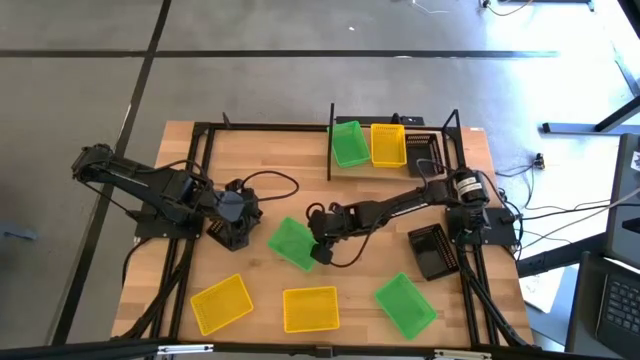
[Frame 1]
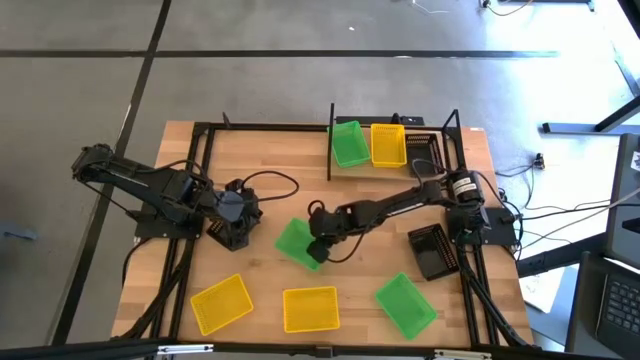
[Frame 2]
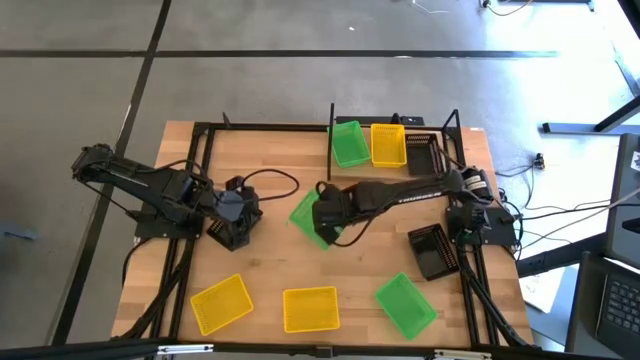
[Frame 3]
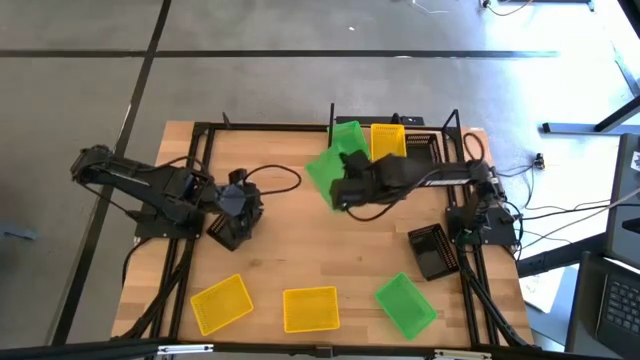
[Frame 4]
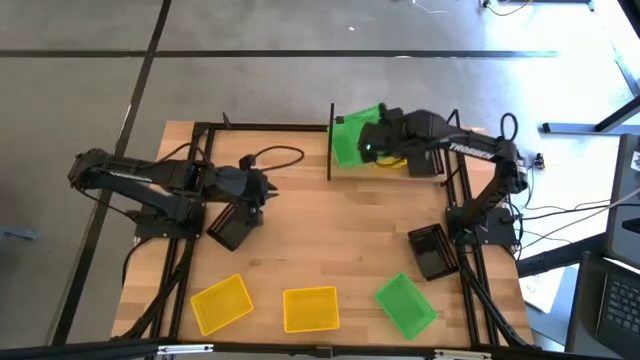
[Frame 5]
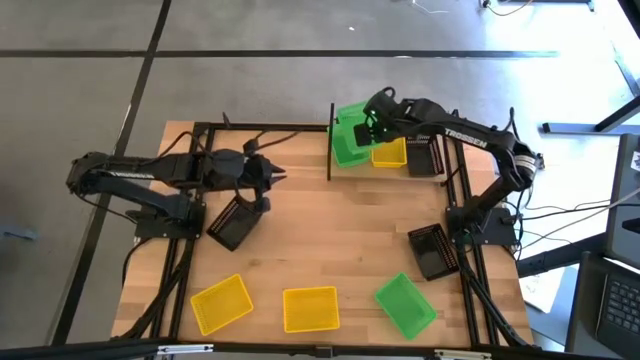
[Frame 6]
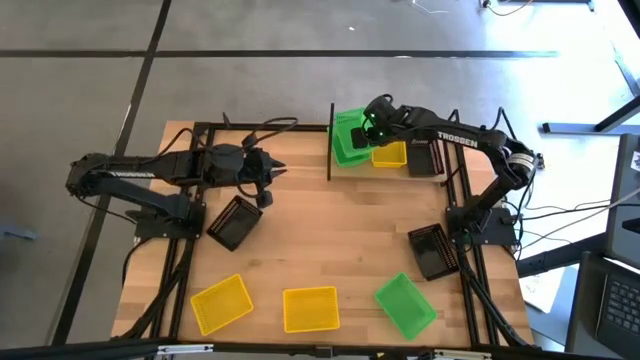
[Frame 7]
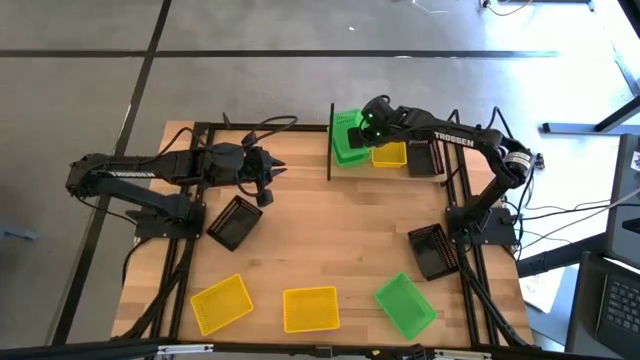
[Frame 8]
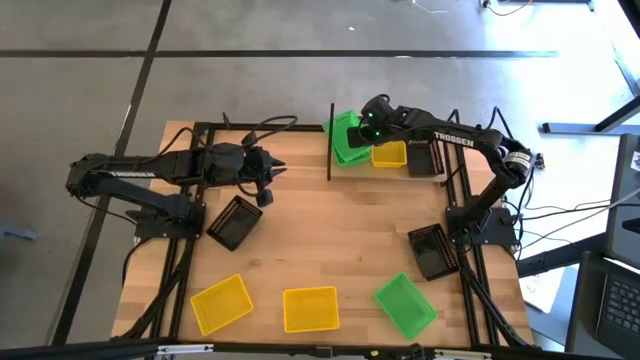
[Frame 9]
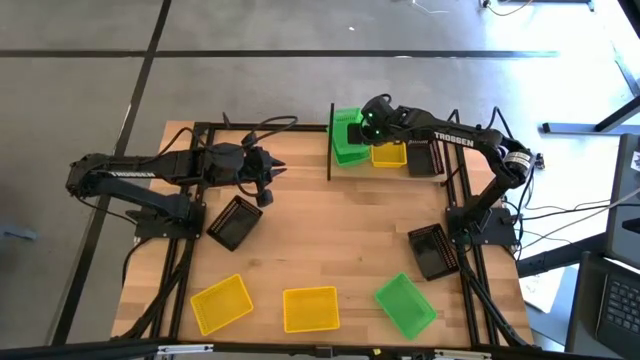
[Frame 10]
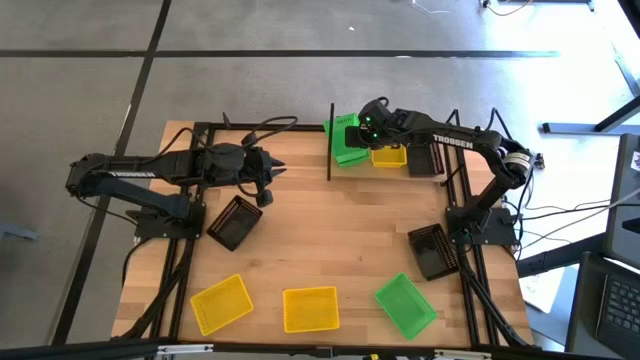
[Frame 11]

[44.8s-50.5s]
Task: Stack baskets on shelf by color
Stack the top green bin on the green bin on the shelf

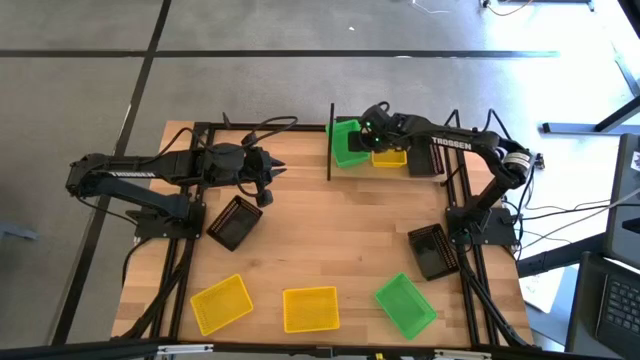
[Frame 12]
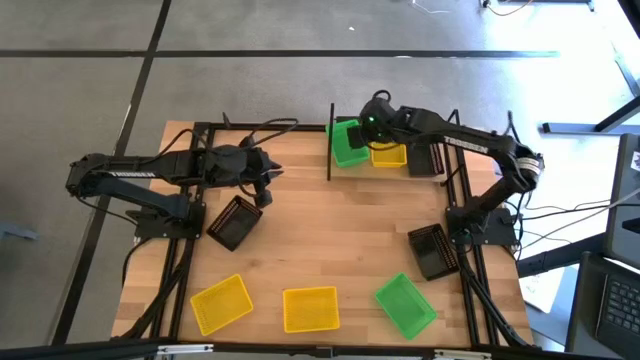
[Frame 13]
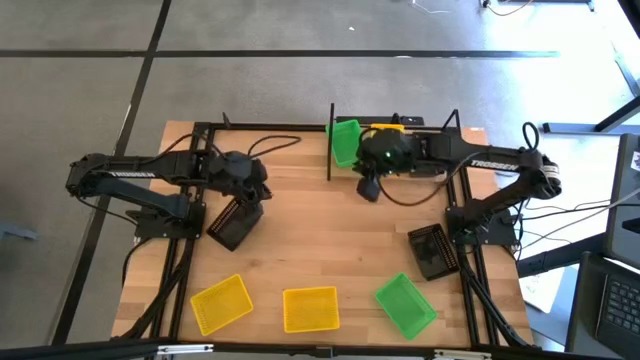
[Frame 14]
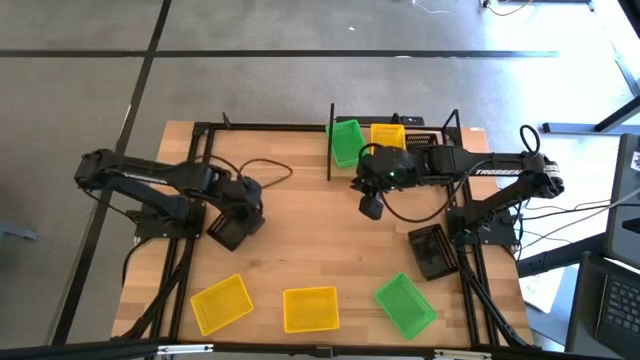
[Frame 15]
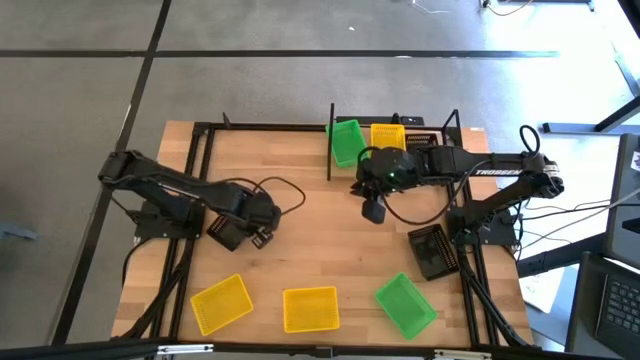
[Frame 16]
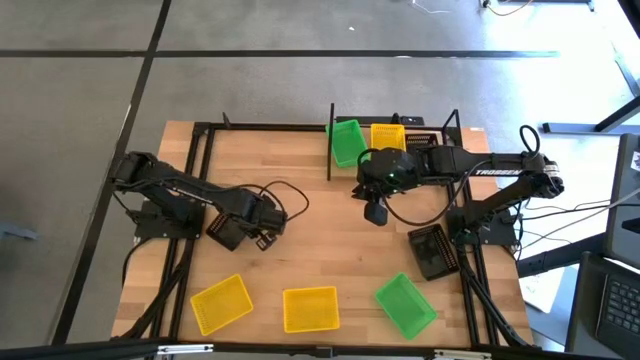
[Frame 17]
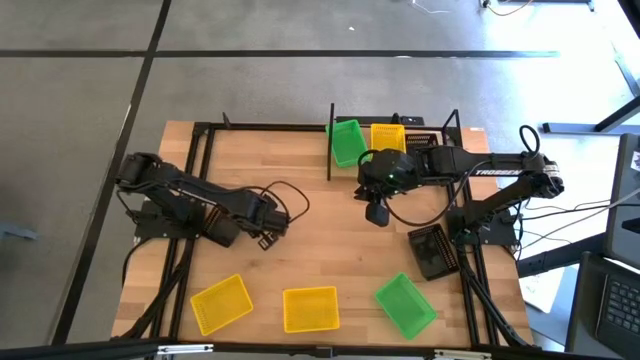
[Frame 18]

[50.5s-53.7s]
Stack the left black bin on the black bin on the shelf

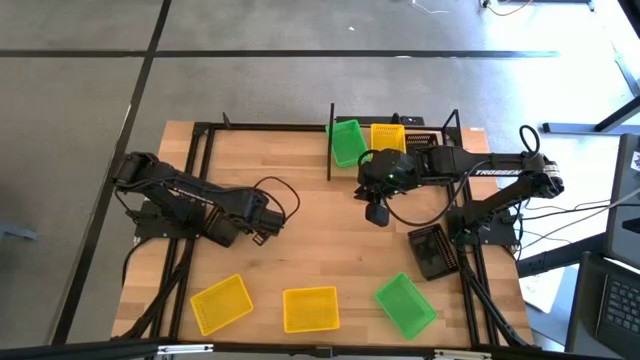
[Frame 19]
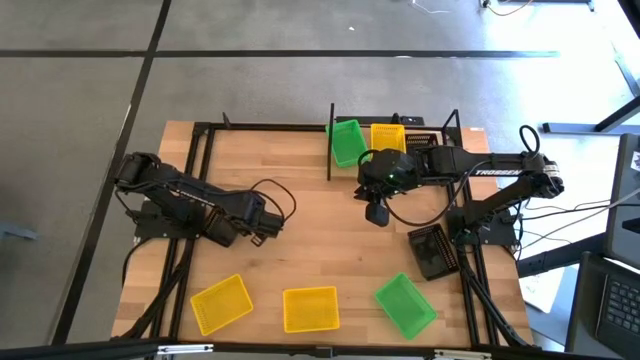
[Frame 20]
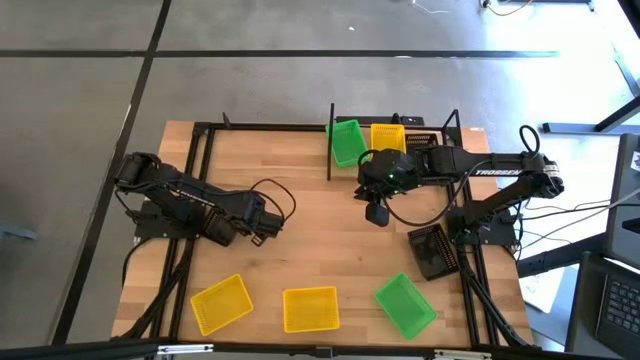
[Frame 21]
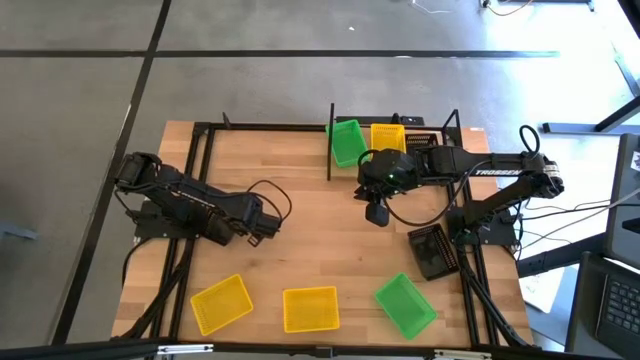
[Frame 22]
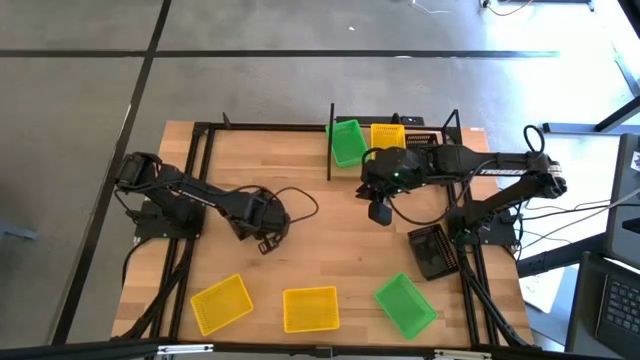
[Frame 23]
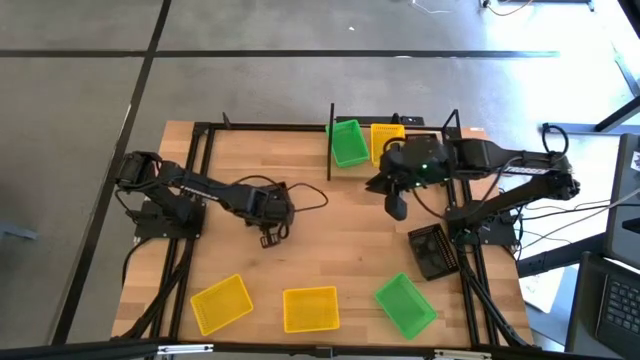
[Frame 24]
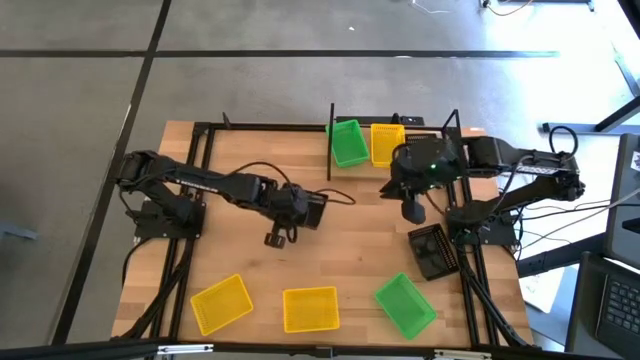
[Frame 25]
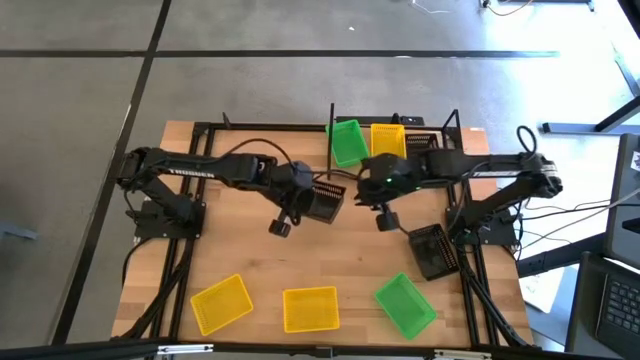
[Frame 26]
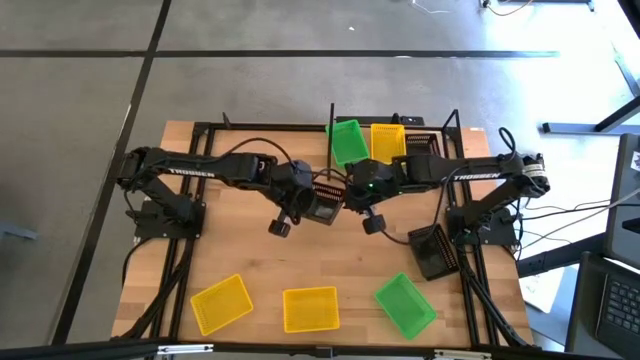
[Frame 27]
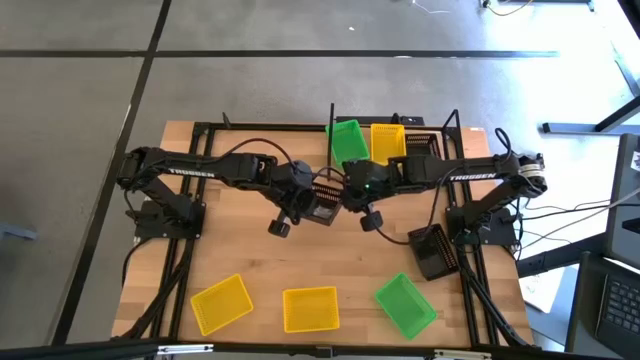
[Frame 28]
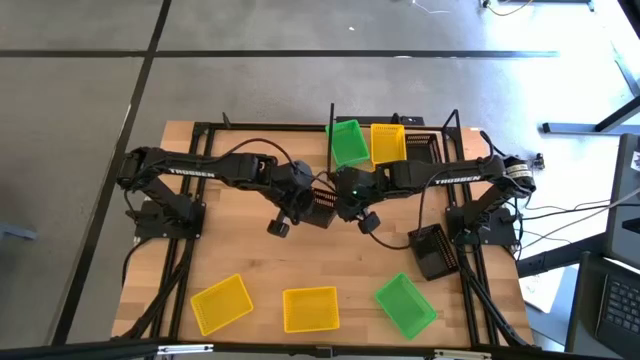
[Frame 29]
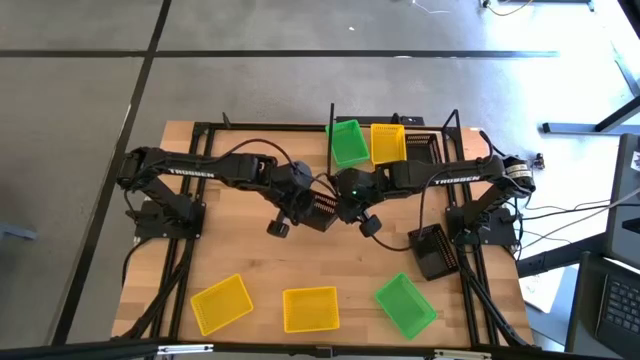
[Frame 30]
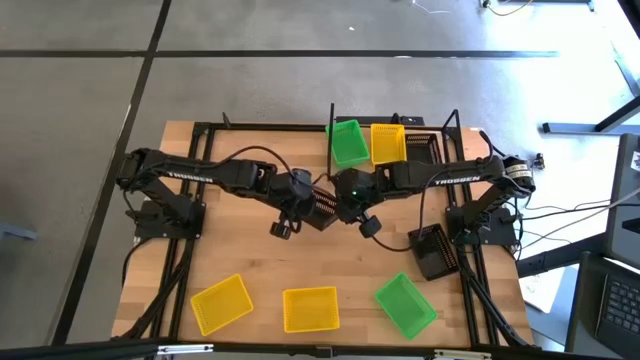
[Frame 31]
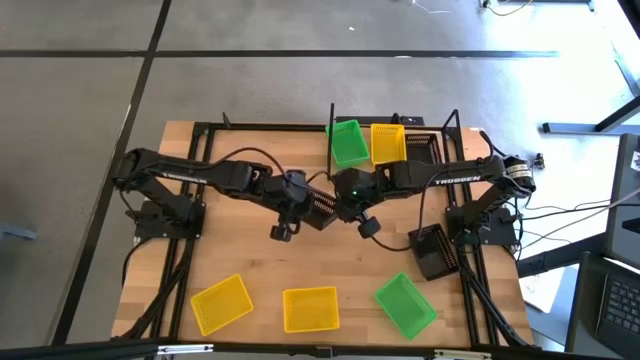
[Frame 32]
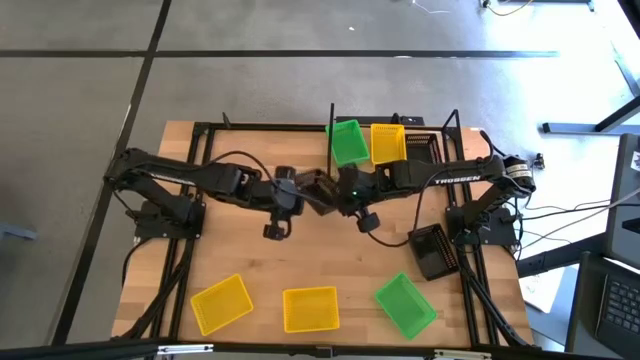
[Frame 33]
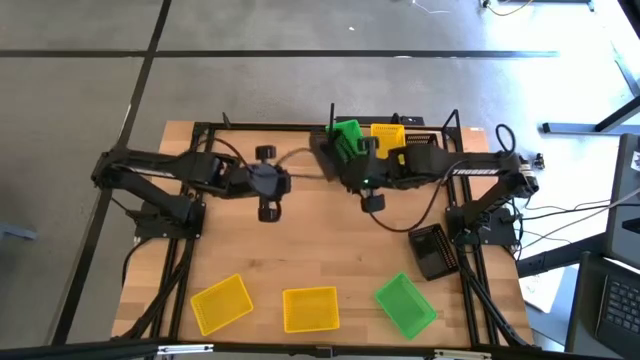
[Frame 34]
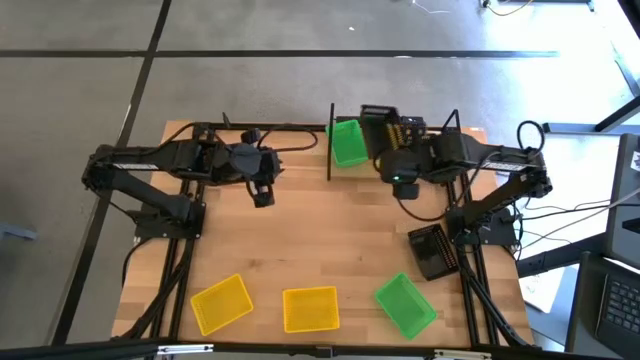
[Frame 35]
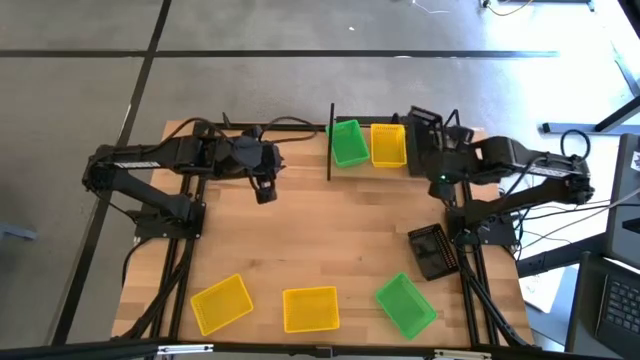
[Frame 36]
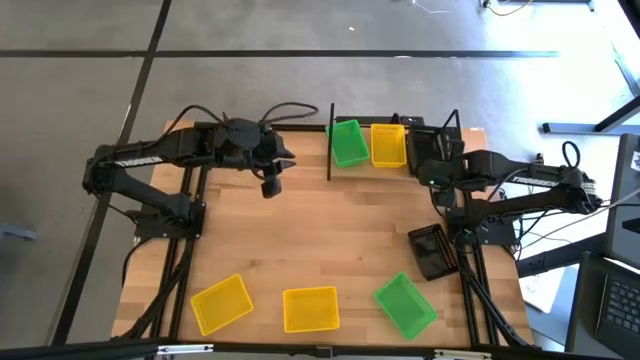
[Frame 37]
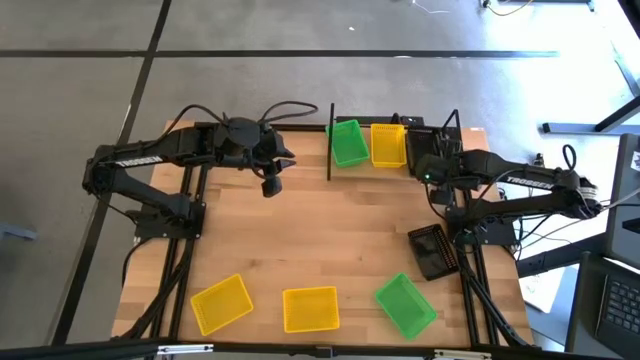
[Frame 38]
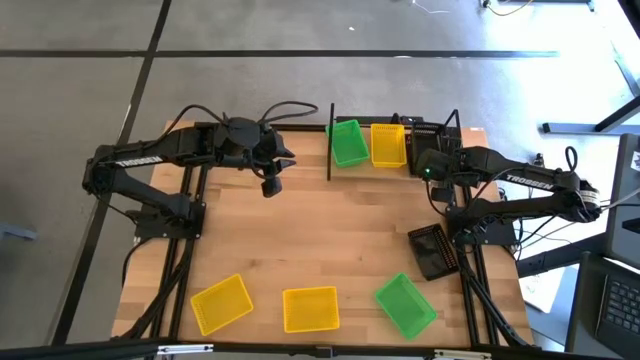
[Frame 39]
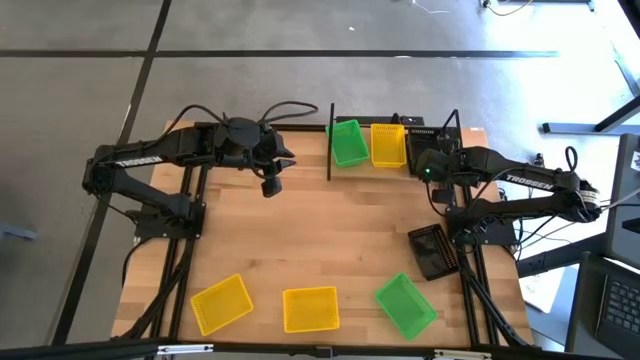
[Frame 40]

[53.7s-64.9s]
Stack the left black bin on the black bin on the shelf

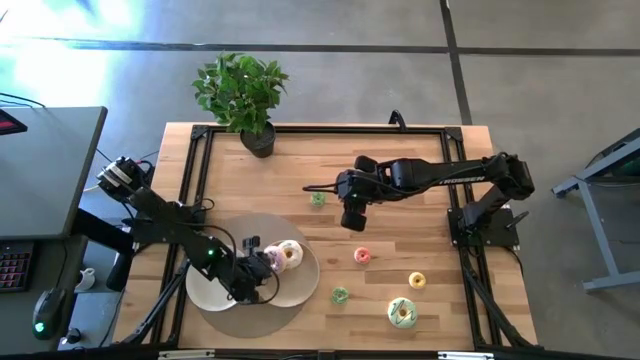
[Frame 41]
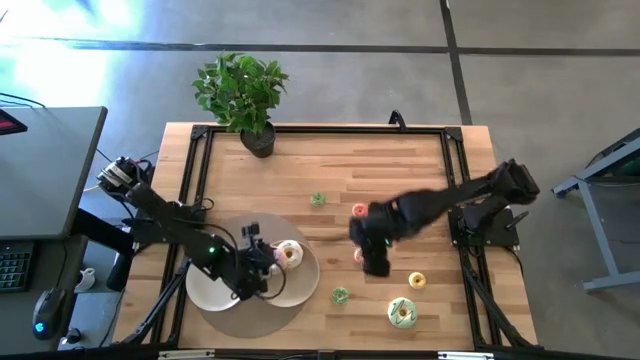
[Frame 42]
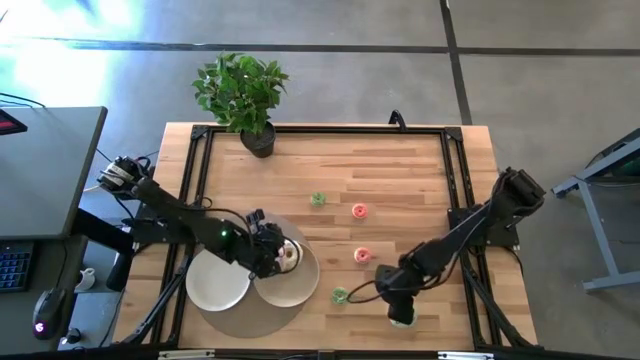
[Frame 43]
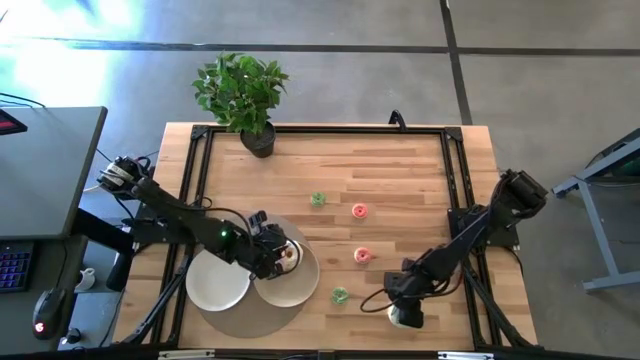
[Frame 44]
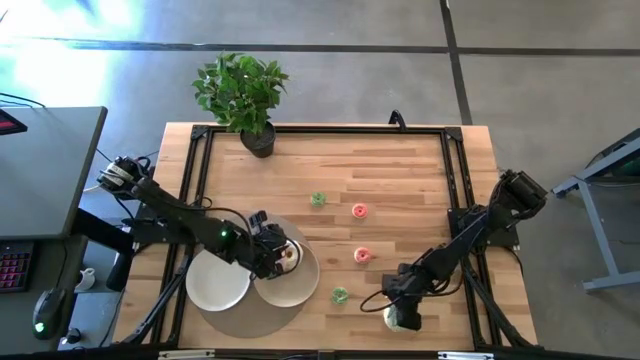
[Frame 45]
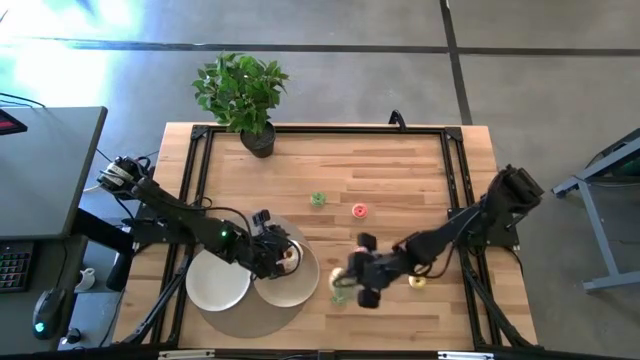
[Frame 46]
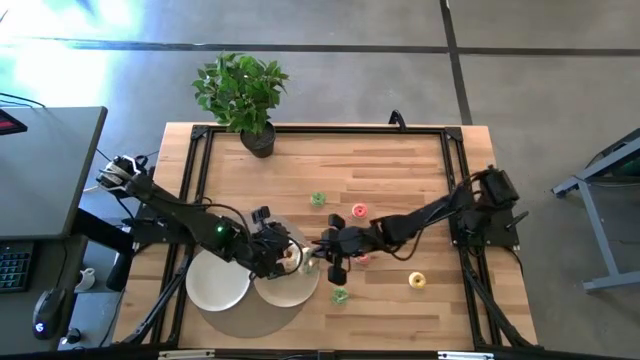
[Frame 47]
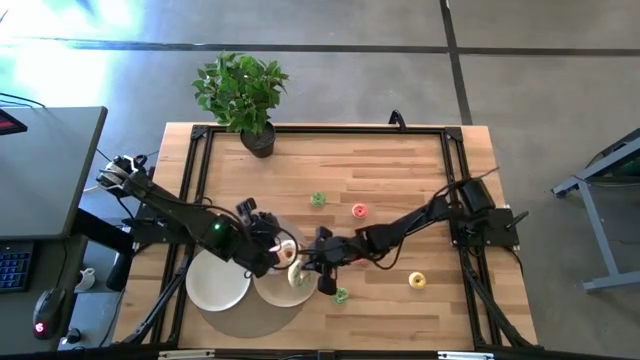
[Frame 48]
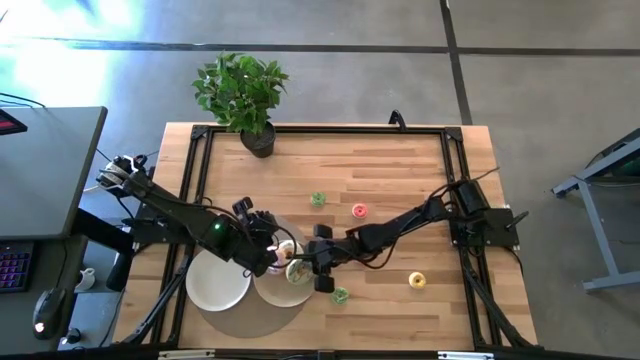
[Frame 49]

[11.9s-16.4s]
Task: Pick & Place donuts
Put the big green donut on the brown plate
